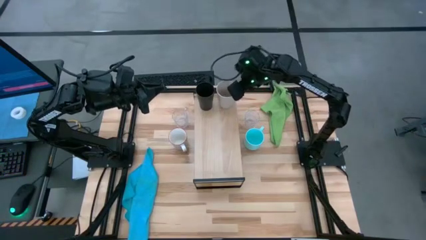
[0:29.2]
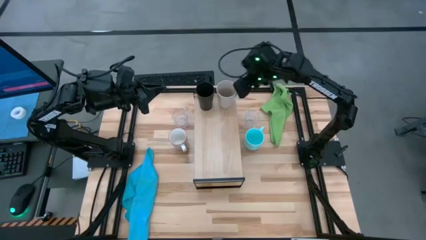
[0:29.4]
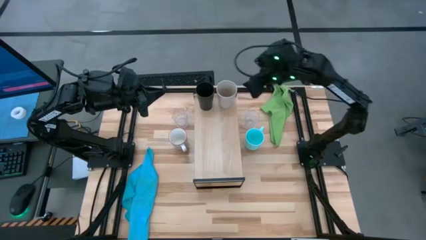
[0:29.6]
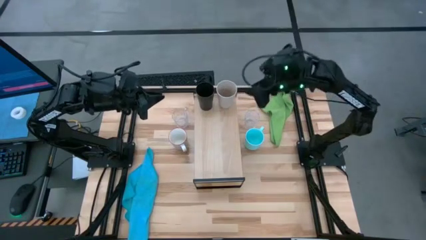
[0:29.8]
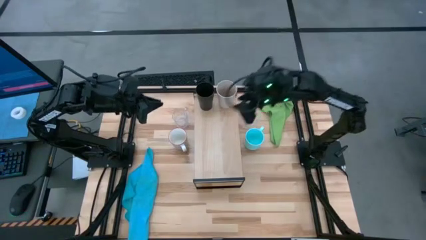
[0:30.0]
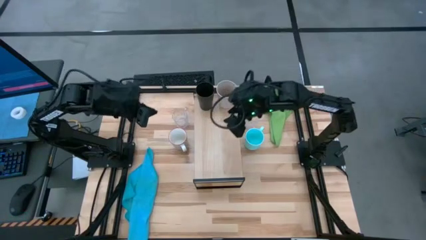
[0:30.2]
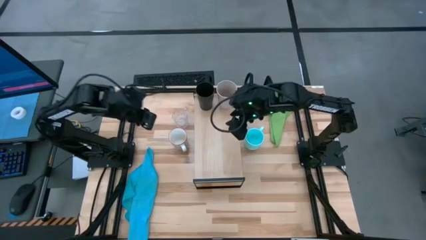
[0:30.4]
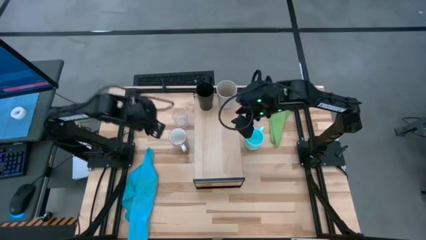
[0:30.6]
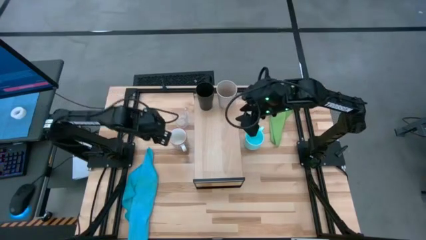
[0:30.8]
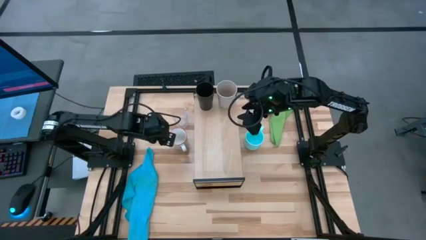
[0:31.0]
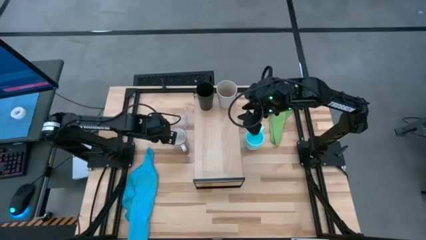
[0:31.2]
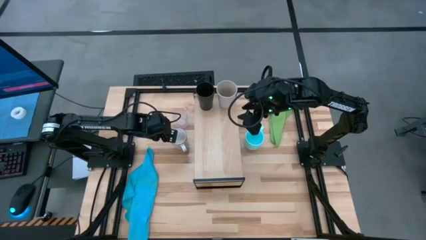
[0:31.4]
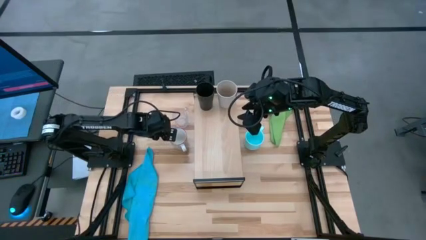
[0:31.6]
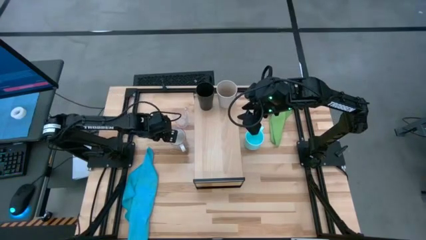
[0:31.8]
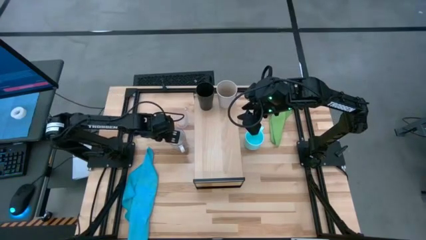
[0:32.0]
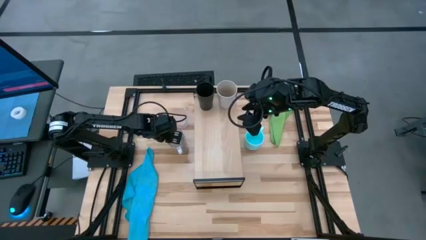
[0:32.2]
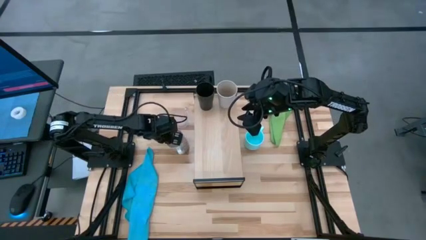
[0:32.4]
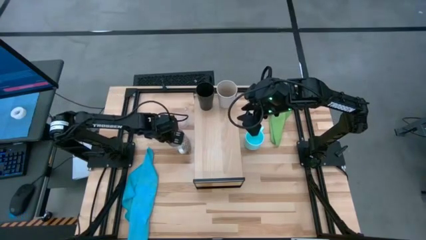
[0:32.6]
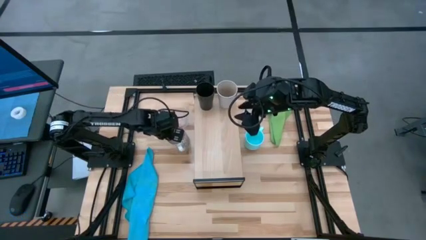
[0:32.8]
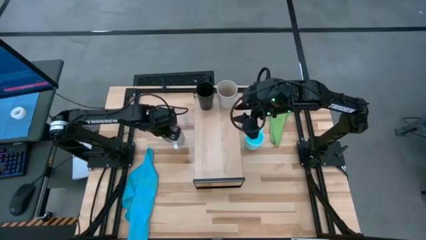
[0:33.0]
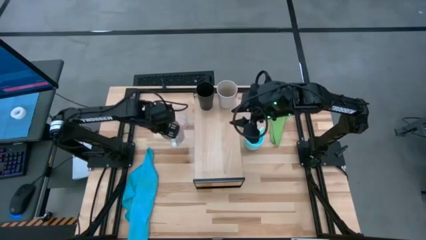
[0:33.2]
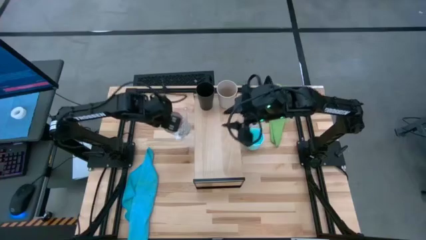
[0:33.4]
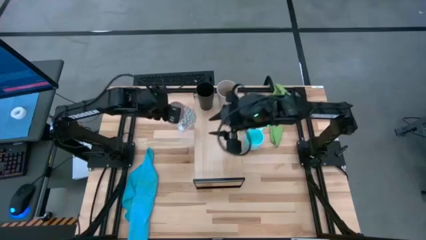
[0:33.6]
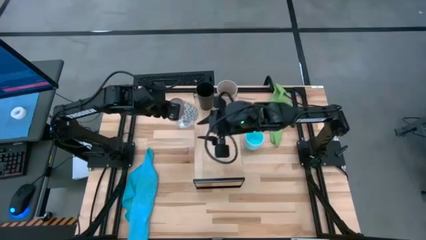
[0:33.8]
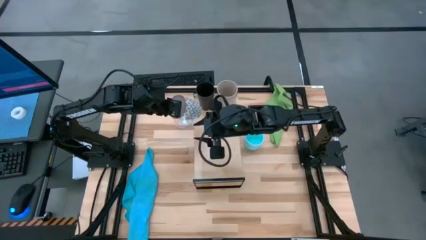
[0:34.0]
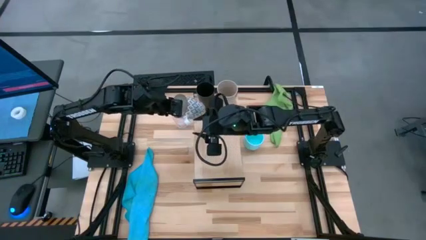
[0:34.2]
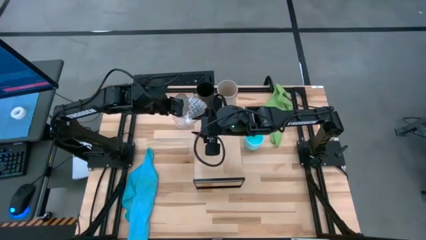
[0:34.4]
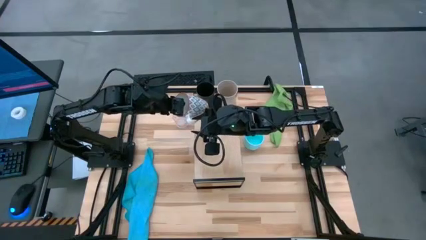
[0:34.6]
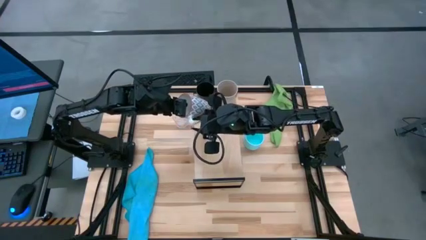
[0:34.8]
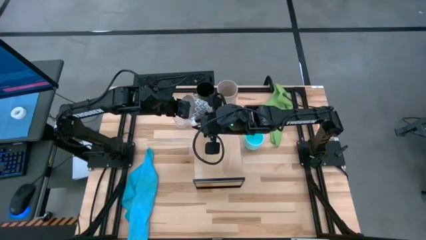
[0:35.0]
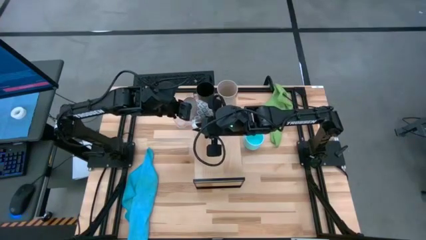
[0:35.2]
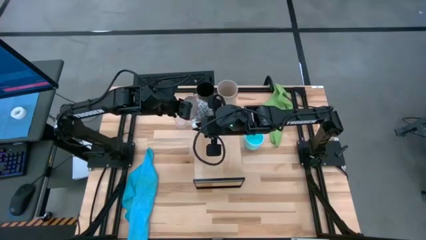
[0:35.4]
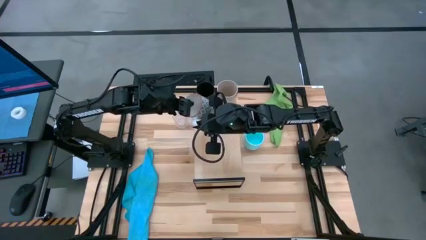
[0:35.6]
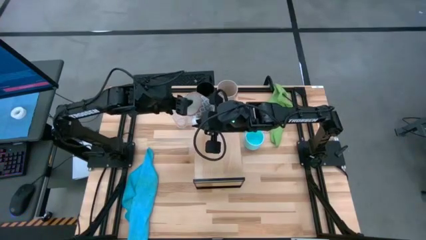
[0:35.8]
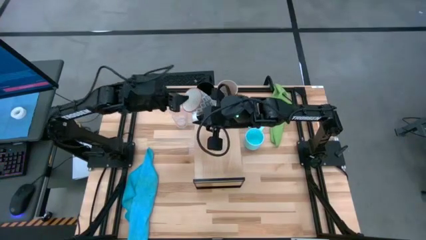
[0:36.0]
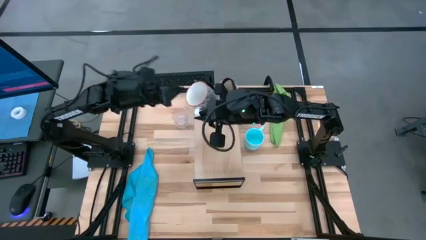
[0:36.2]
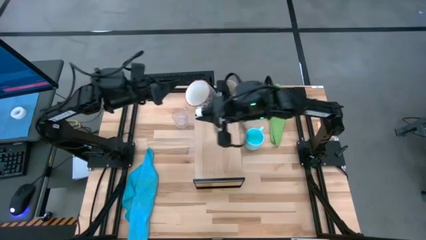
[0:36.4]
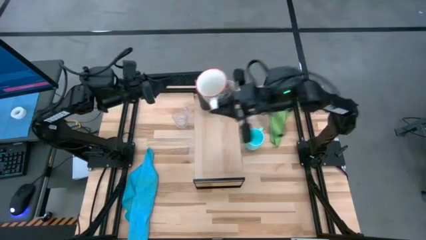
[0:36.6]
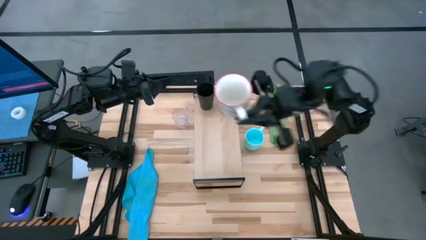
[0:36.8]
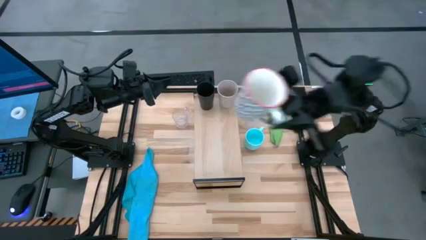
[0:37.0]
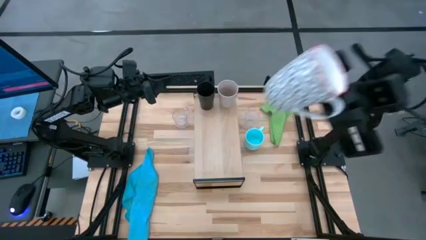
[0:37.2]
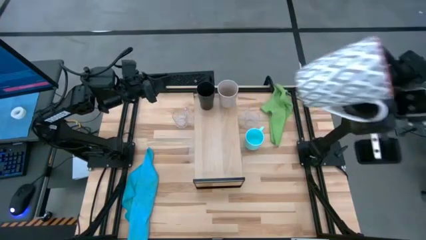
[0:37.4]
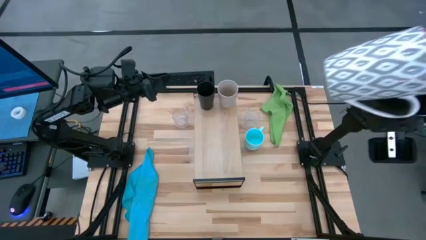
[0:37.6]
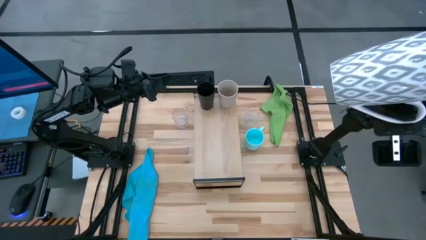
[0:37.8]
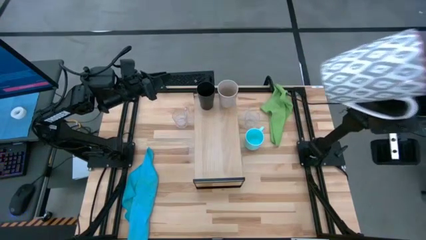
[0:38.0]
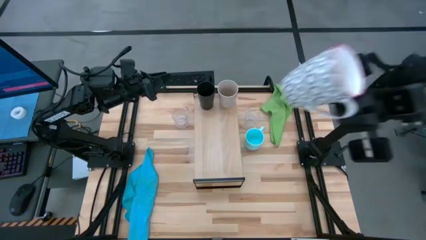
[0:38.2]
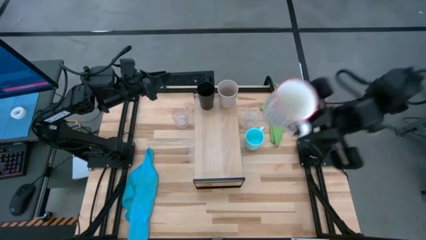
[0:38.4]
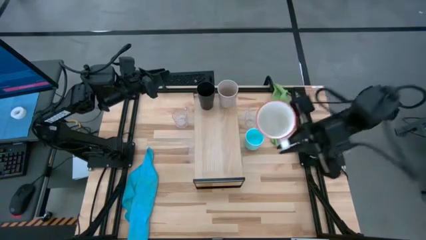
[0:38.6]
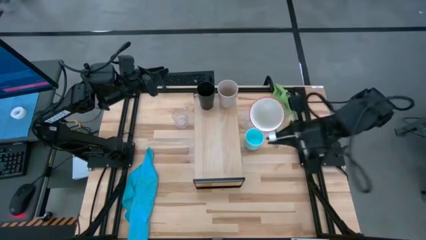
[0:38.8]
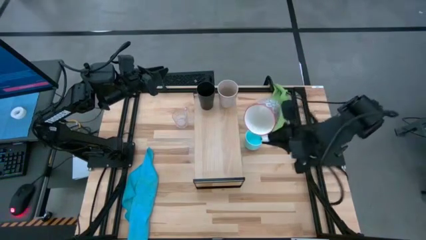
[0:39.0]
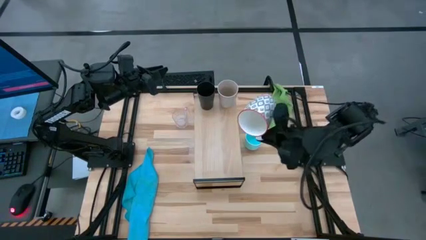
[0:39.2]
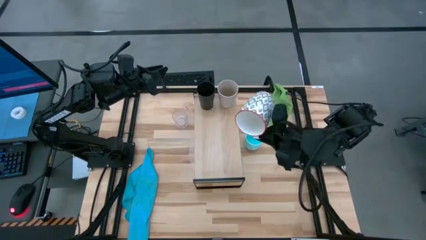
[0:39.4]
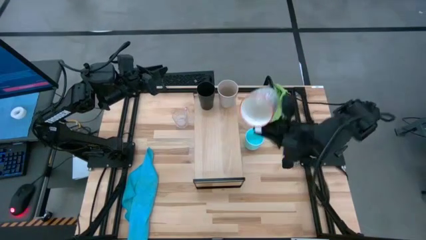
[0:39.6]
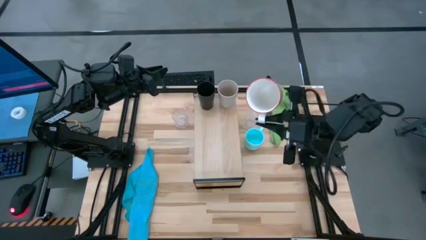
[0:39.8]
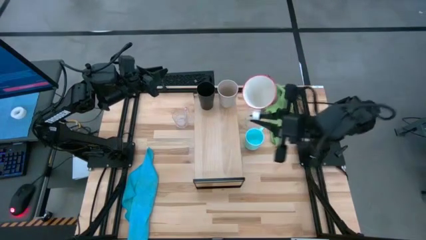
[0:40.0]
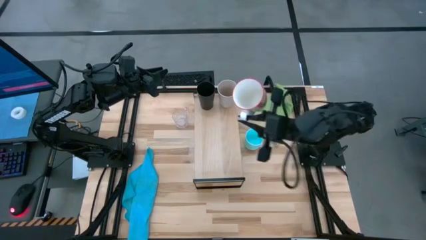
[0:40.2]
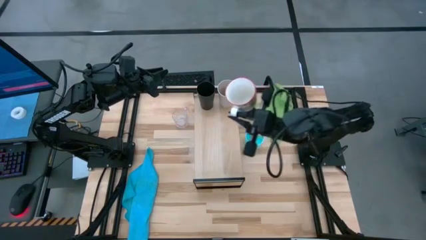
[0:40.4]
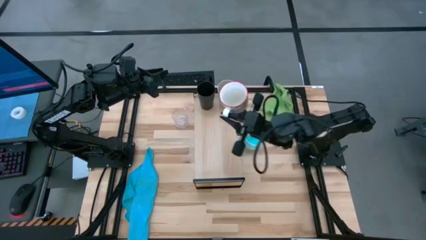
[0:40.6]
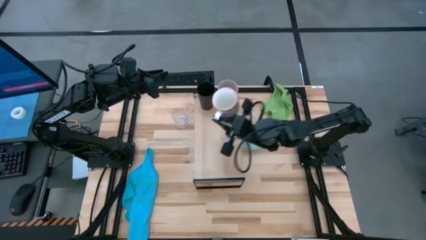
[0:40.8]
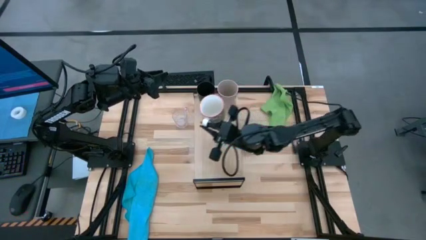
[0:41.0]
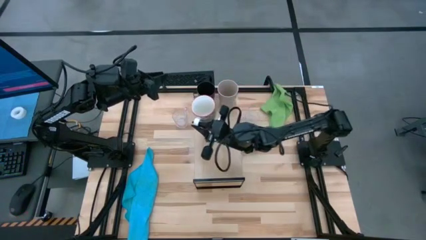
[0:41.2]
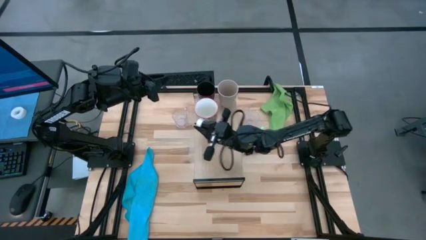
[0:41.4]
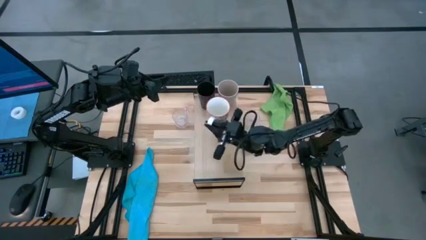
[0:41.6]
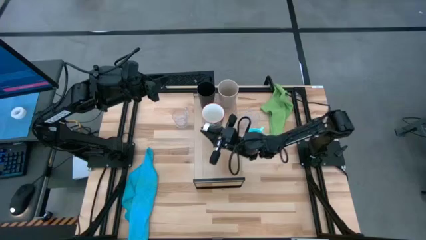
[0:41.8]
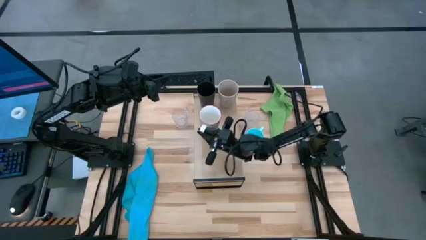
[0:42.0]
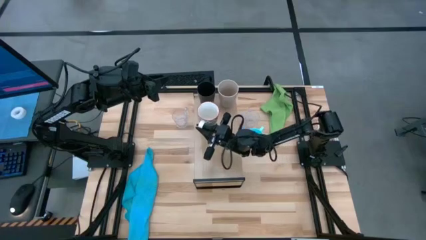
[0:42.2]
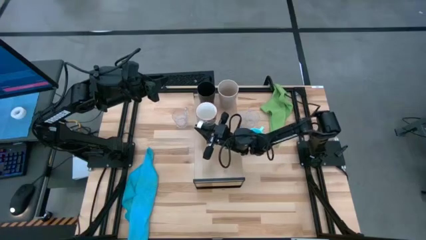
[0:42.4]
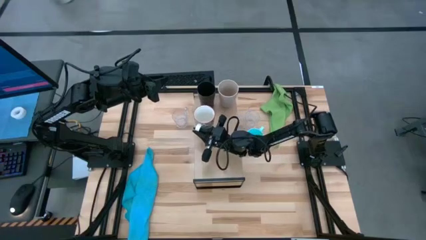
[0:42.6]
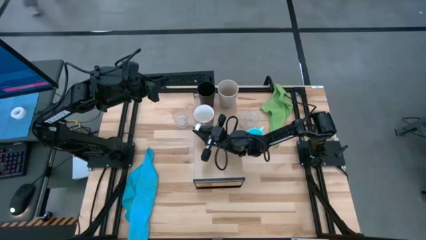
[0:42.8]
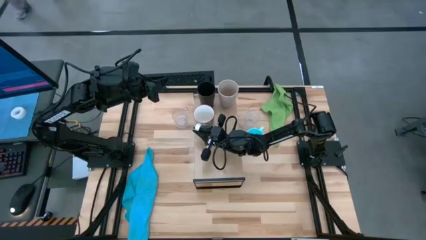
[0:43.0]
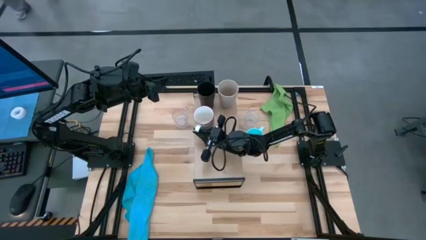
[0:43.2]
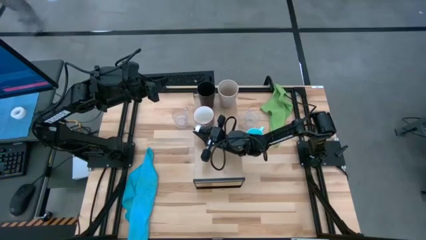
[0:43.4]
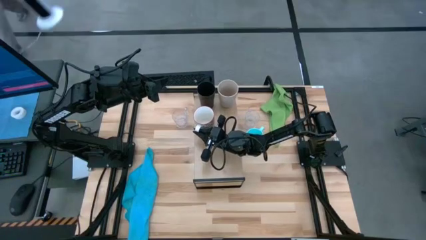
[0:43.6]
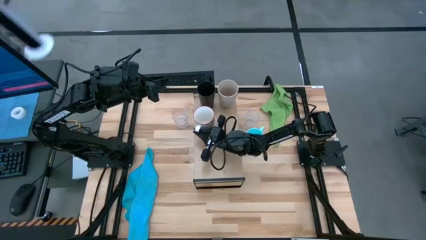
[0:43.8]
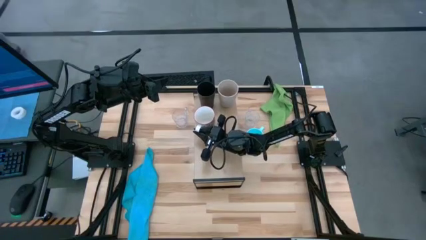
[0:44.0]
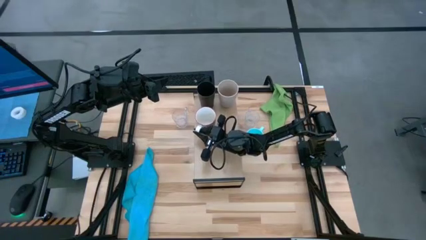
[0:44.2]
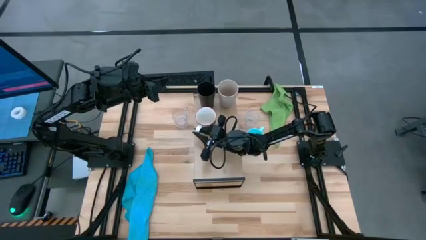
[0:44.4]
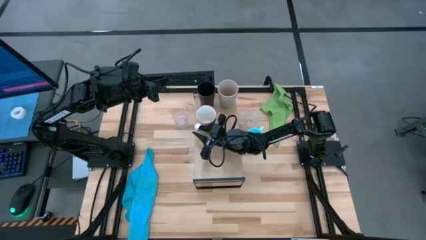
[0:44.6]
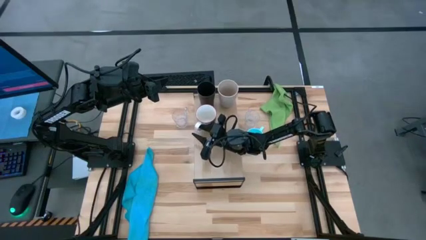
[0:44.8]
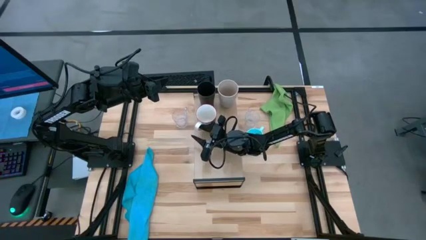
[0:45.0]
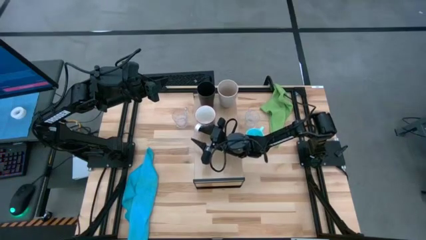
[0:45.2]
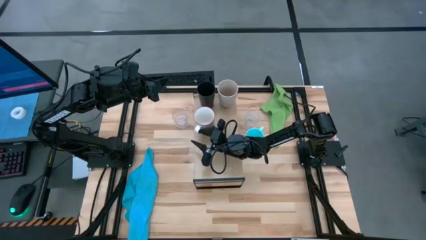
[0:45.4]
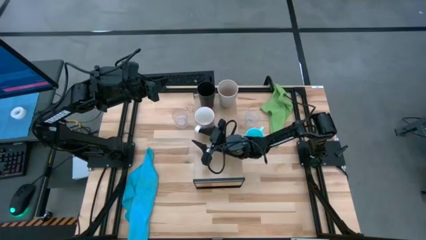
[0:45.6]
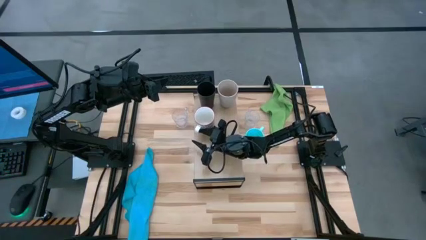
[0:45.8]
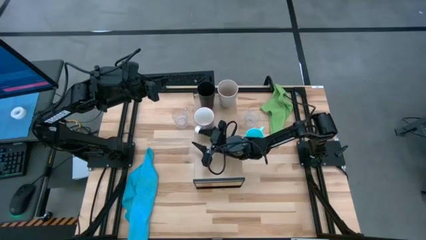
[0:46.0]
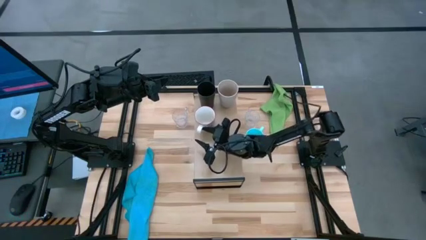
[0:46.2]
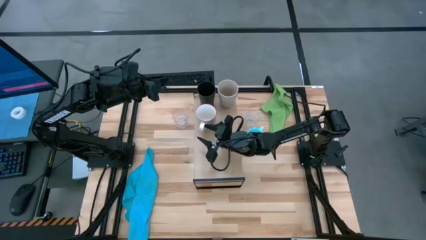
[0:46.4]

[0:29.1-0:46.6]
Task: Stack small to large cups/mugs on shelf
Put the gray cup on the shelf
